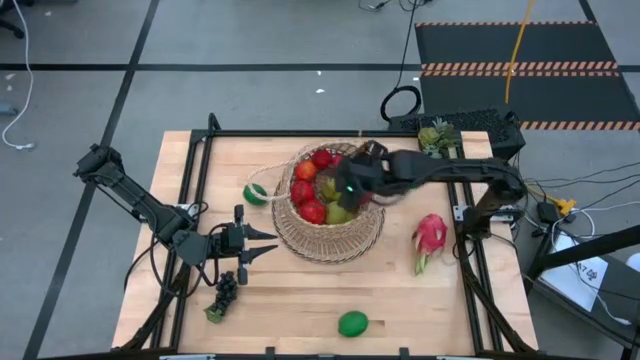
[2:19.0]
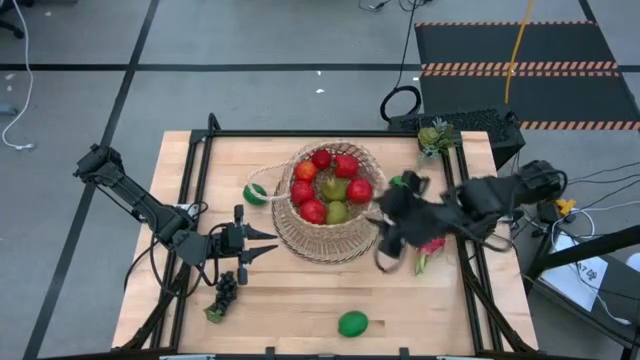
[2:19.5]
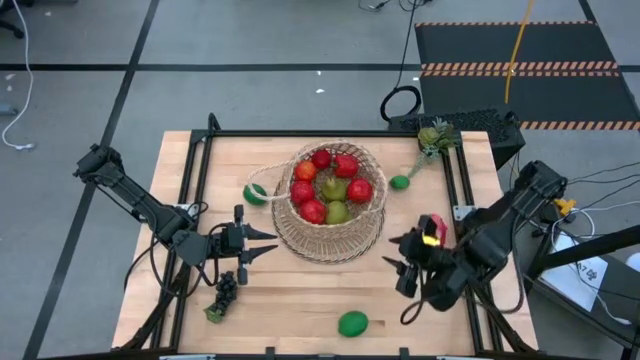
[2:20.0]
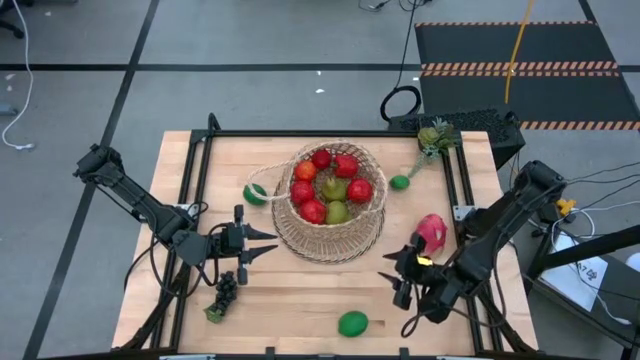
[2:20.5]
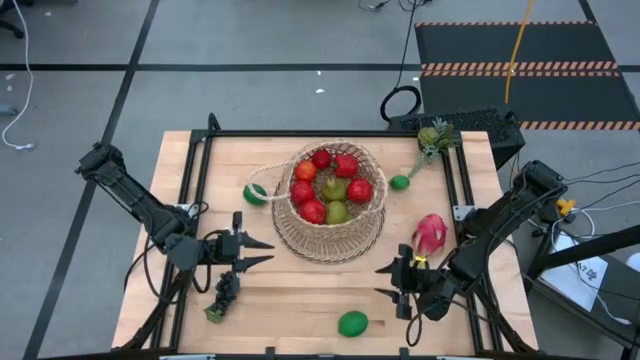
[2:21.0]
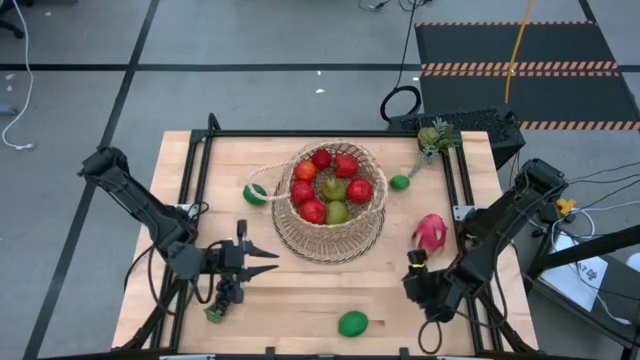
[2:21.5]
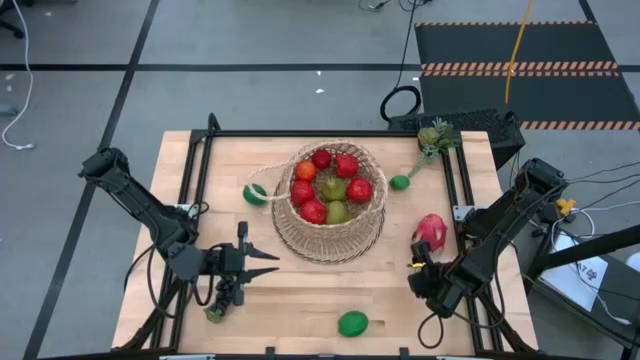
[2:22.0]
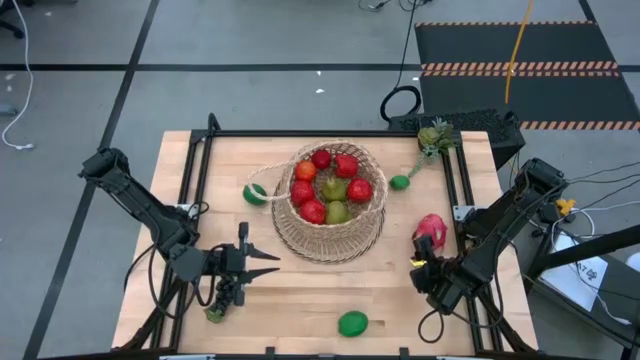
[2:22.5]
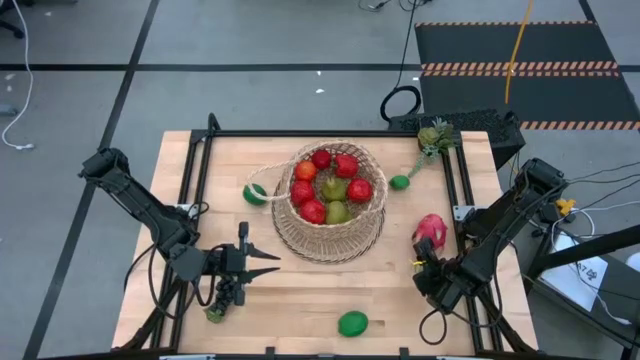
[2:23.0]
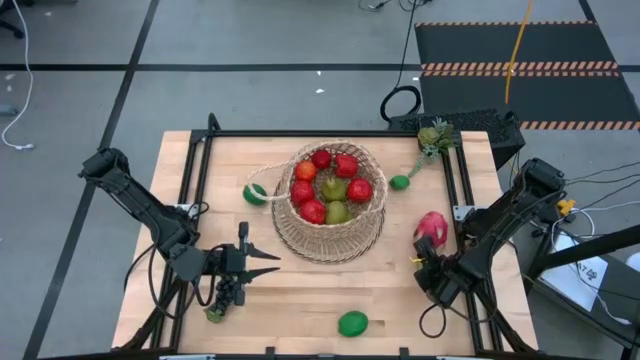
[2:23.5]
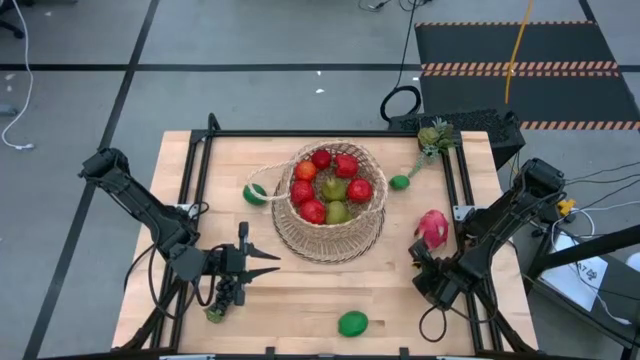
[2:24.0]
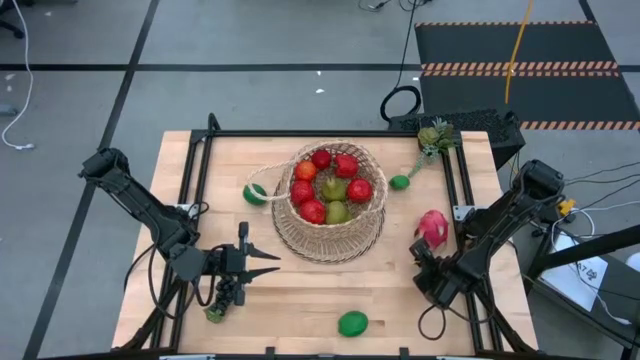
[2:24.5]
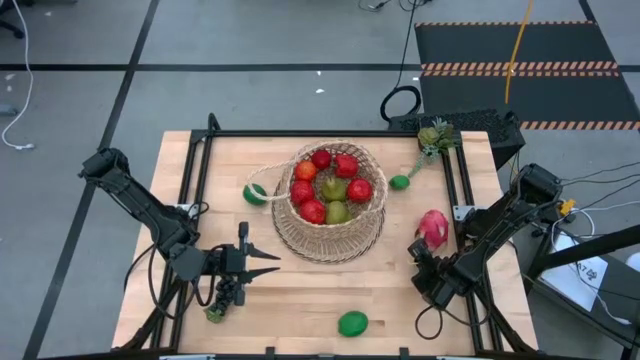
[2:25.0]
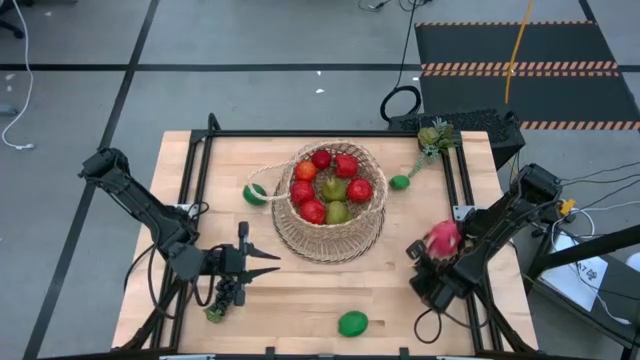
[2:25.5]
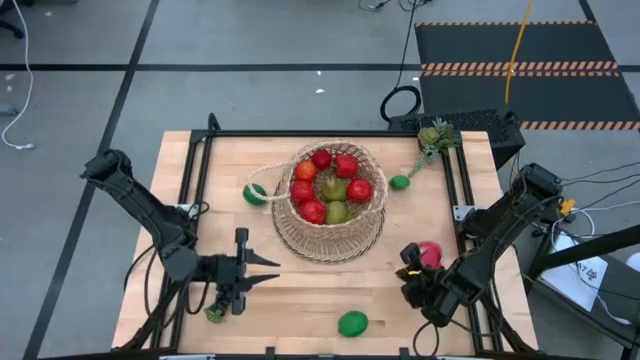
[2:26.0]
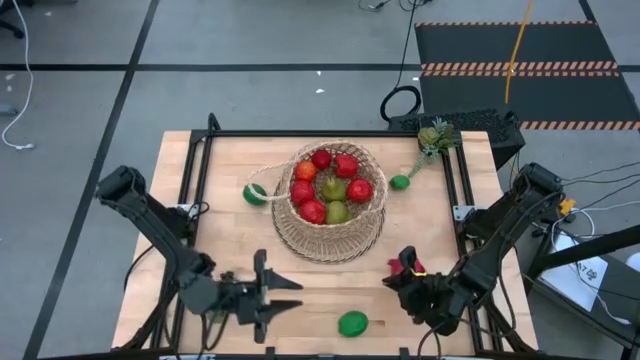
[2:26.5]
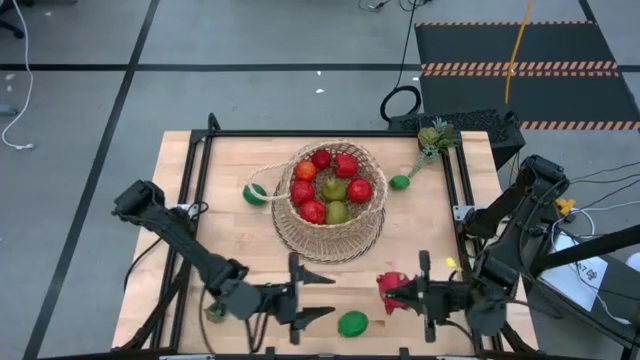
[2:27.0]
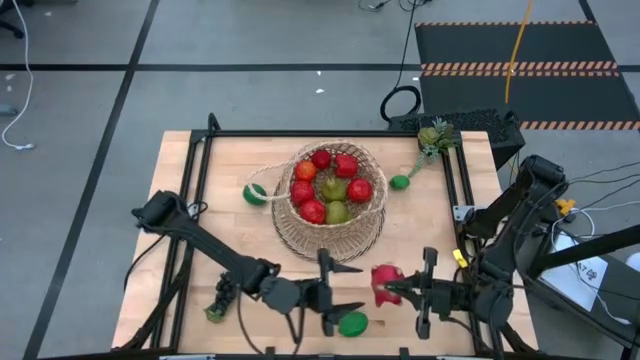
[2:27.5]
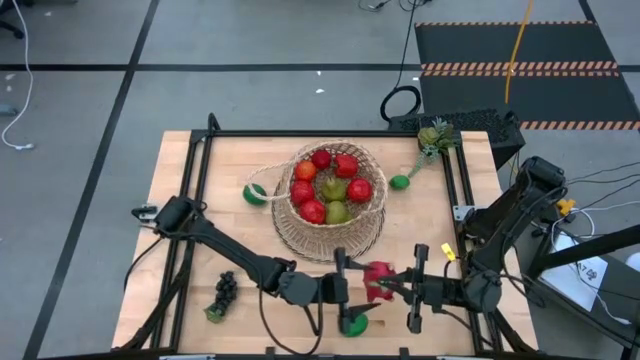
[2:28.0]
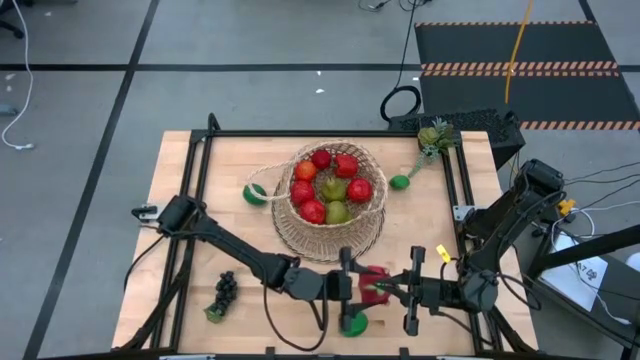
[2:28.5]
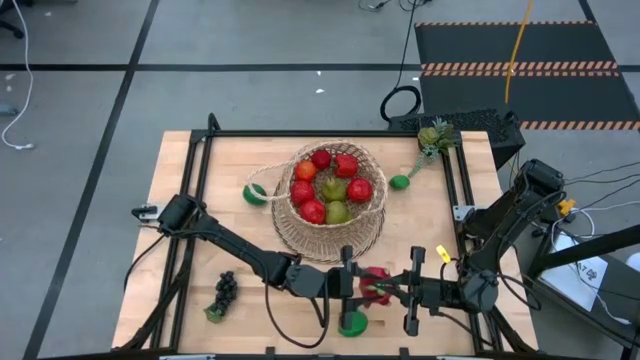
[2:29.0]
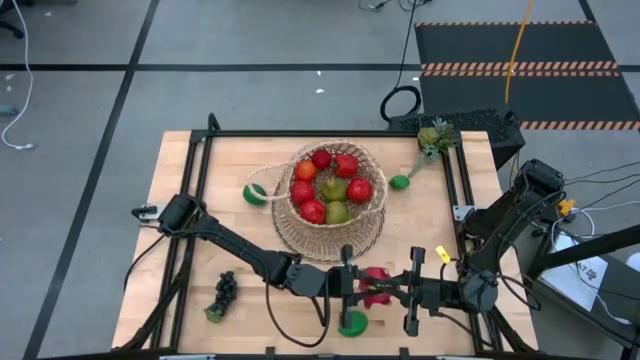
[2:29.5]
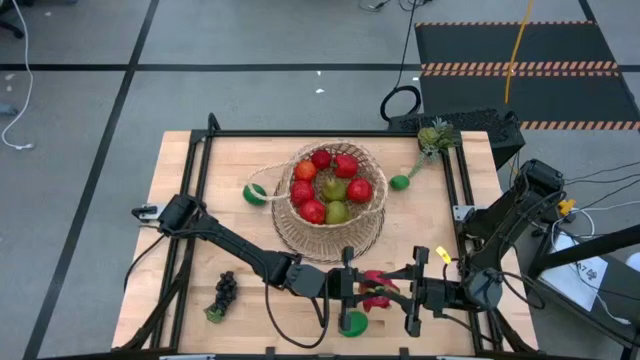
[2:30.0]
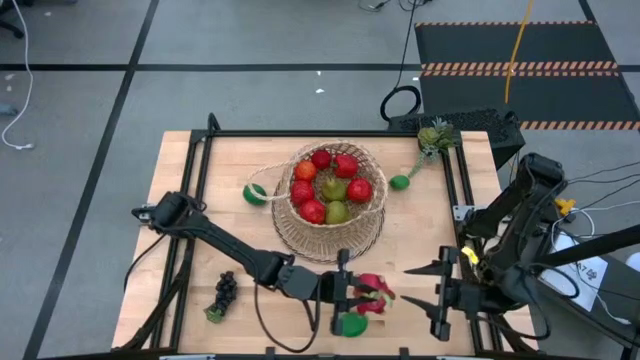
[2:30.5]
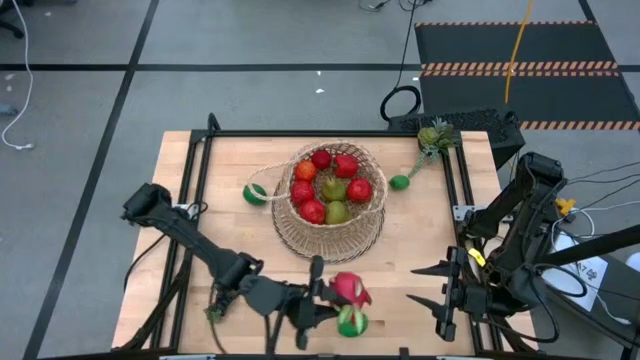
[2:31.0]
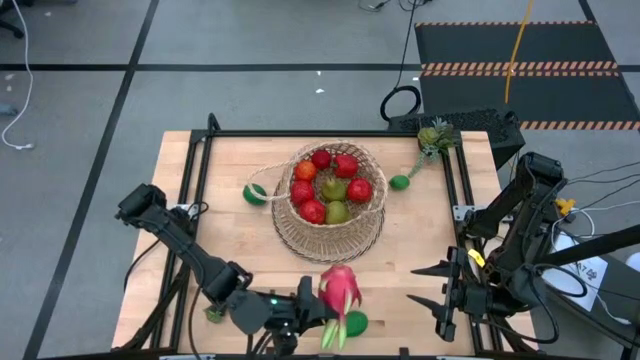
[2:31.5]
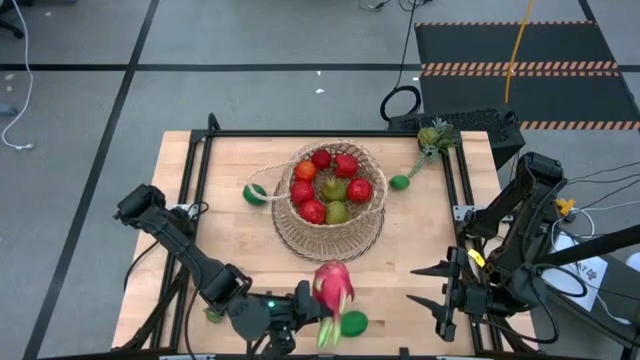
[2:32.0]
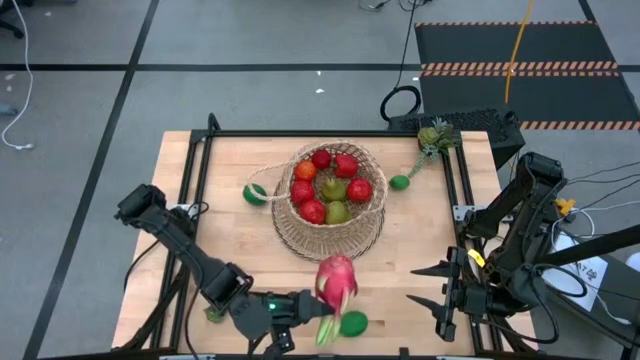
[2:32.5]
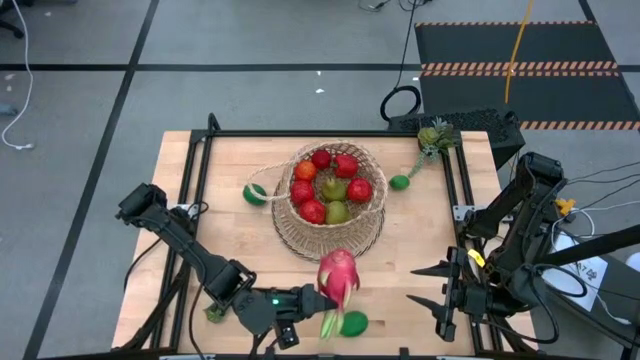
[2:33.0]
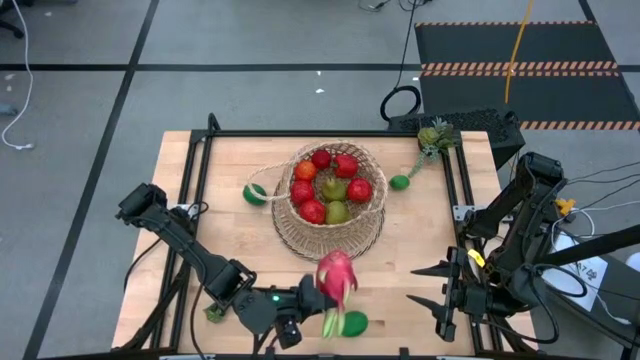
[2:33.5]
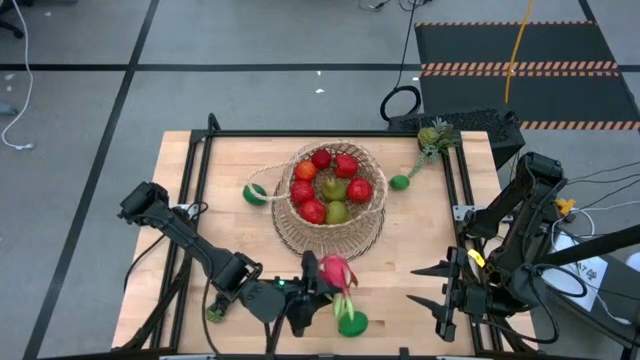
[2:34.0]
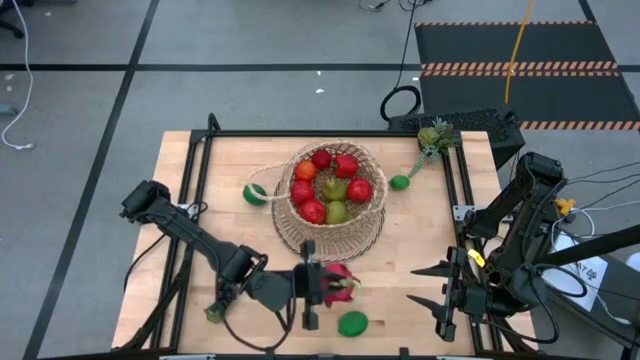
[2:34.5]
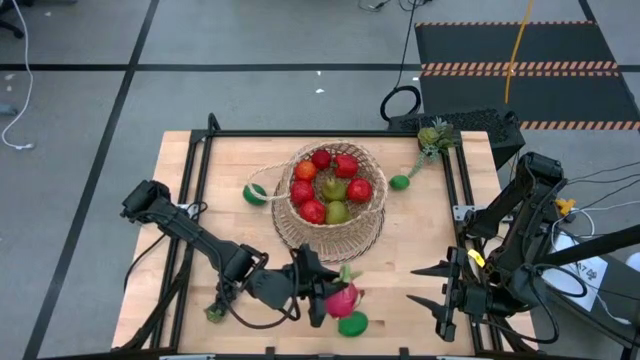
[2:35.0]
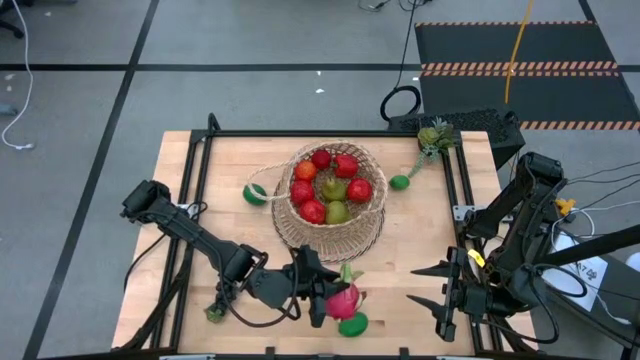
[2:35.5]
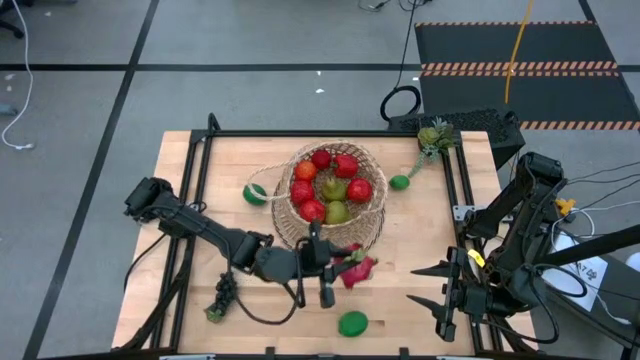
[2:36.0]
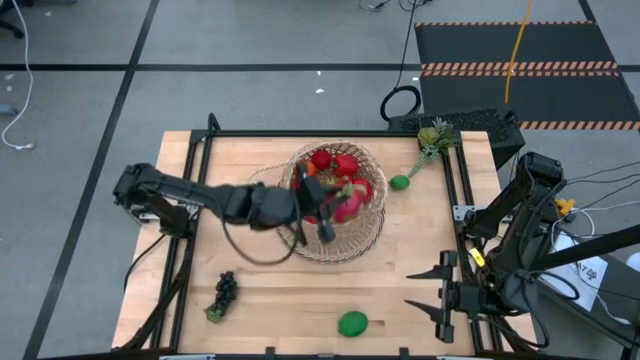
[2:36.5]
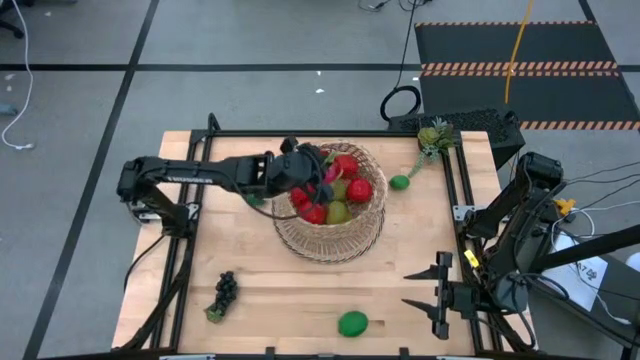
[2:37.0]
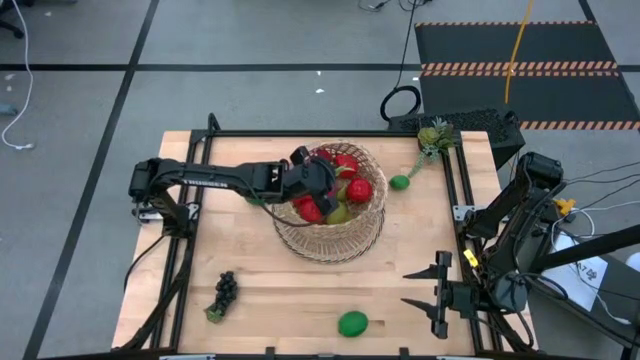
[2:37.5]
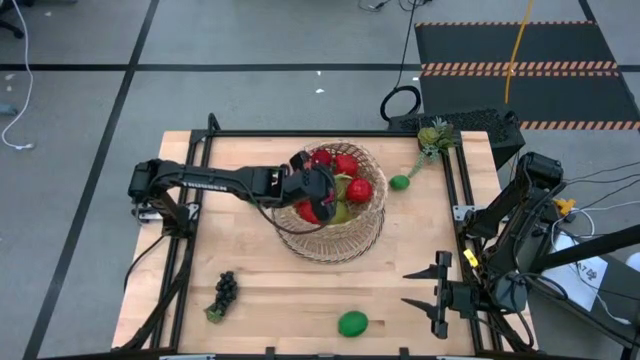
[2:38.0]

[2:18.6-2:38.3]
Task: Build produce basket
Put the dragon fruit into the basket

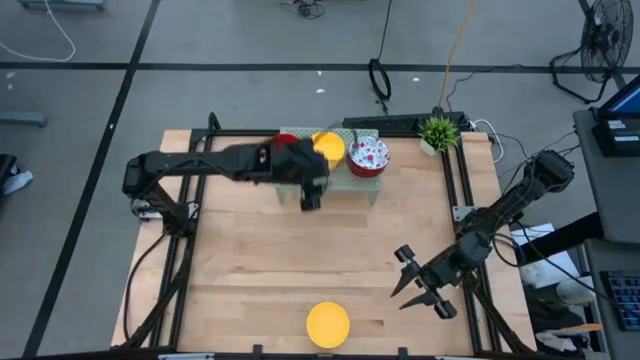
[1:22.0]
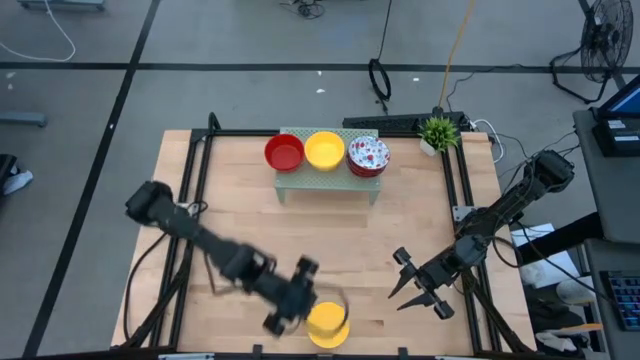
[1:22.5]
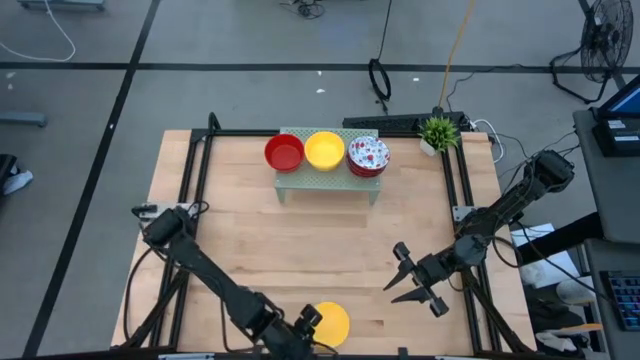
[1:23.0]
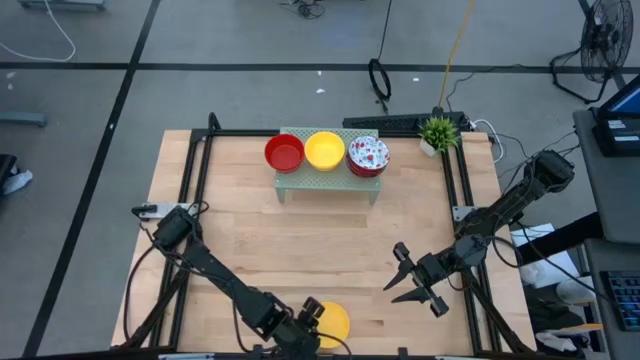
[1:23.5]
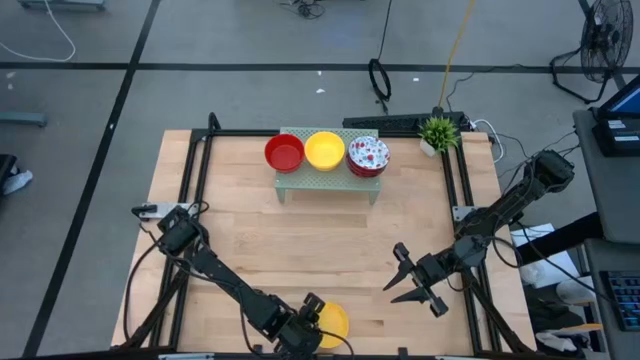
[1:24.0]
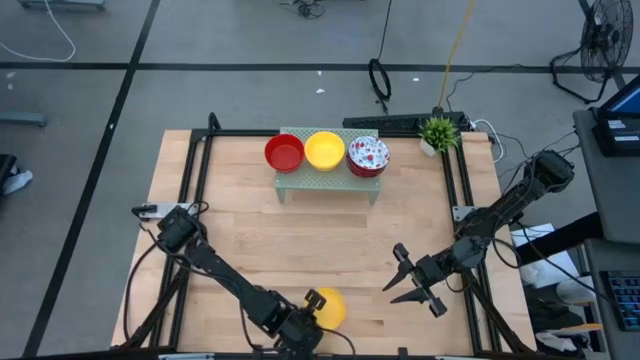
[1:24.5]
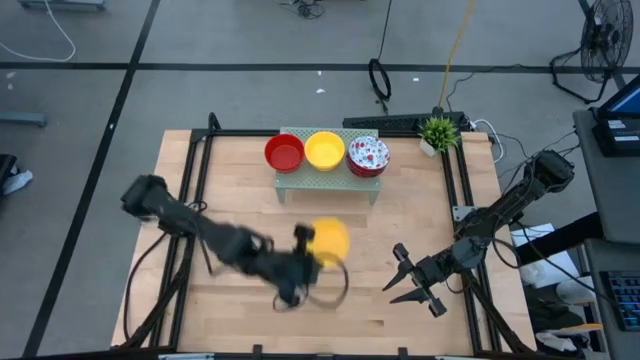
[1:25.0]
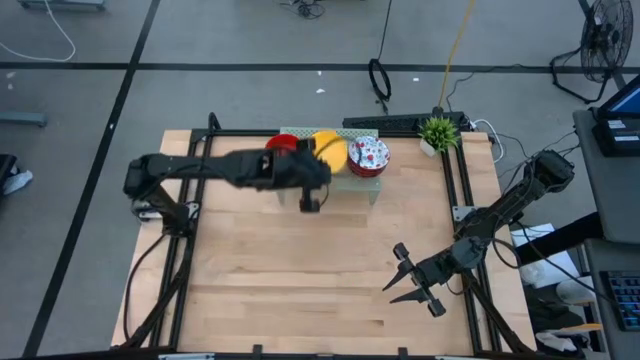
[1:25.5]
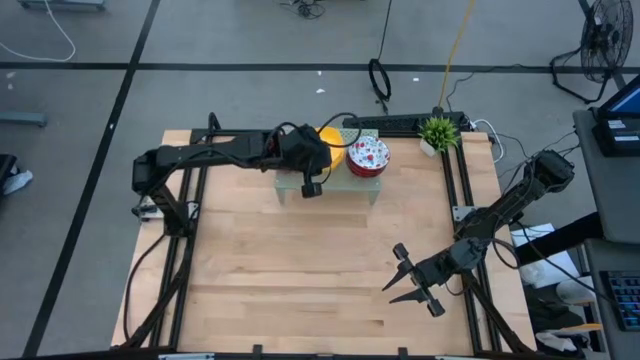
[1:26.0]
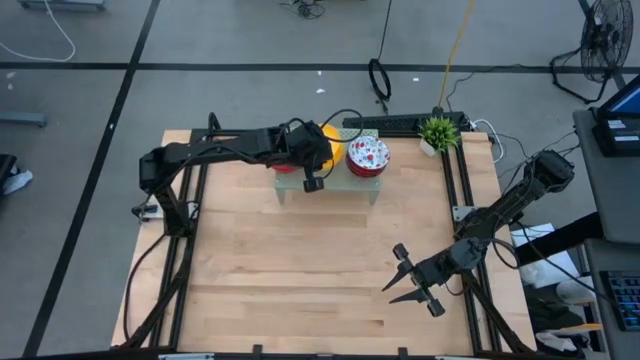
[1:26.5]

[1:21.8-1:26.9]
Task: Pick & Place Mini bowls
Stack the yellow bowl on the yellow bowl on the shelf
